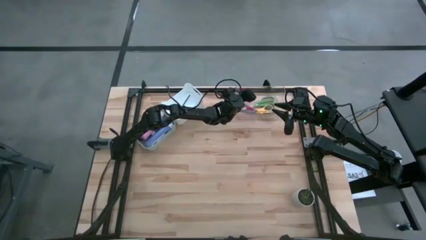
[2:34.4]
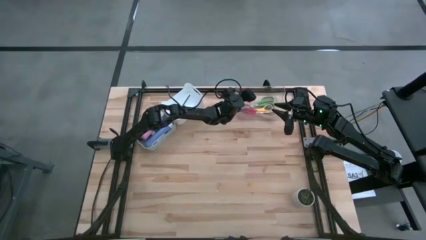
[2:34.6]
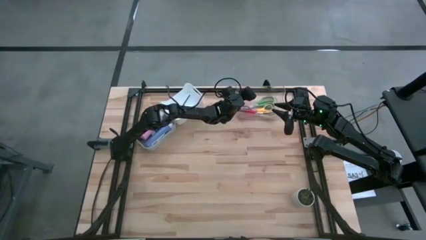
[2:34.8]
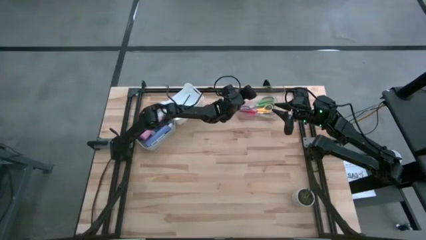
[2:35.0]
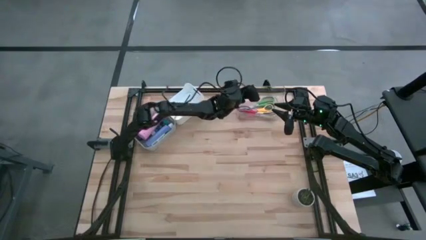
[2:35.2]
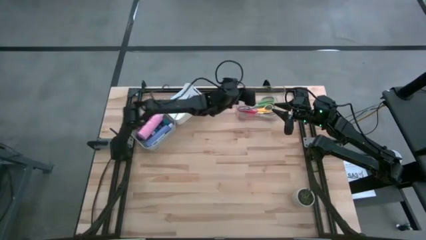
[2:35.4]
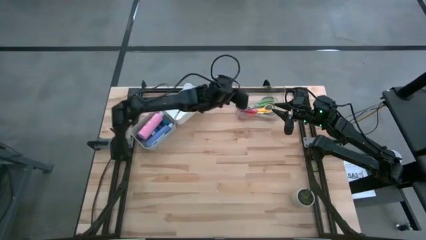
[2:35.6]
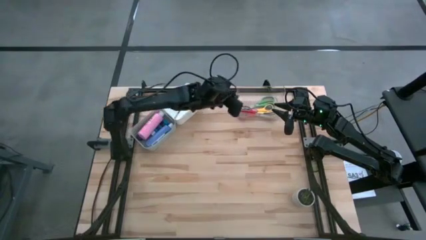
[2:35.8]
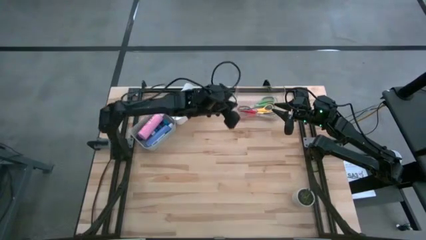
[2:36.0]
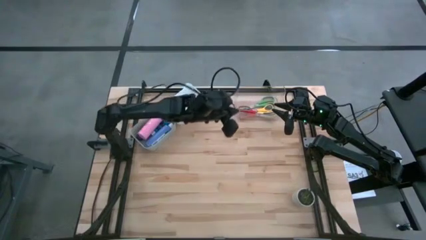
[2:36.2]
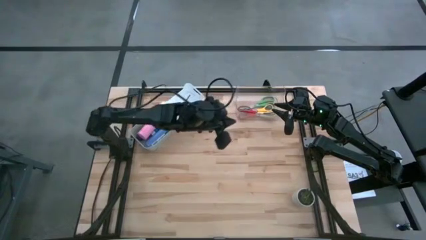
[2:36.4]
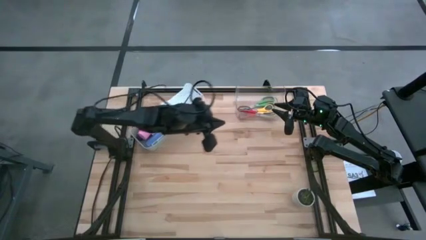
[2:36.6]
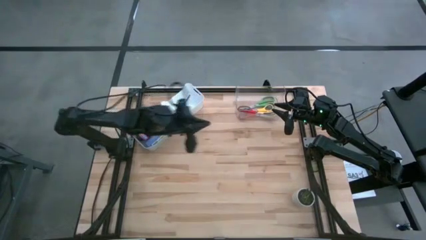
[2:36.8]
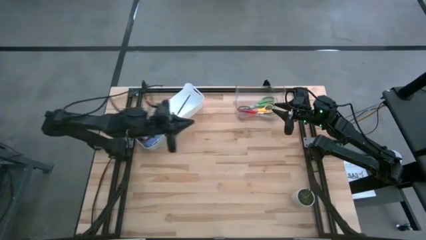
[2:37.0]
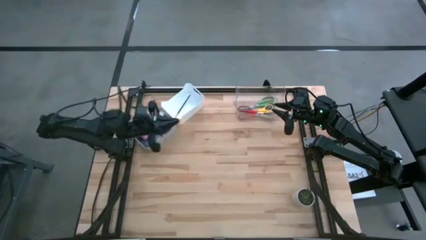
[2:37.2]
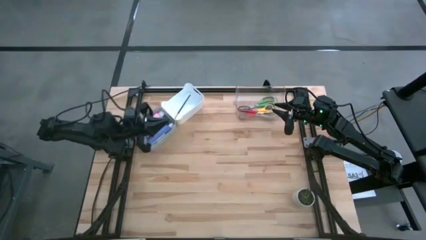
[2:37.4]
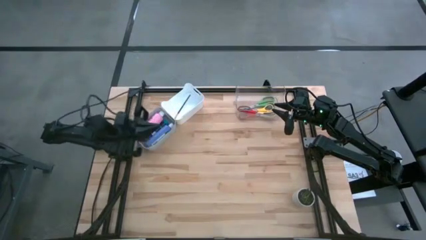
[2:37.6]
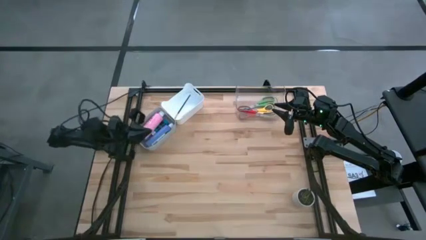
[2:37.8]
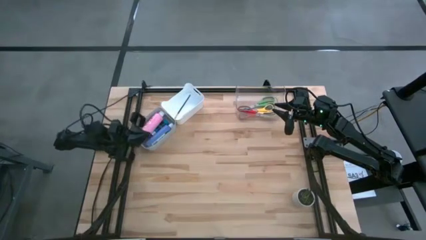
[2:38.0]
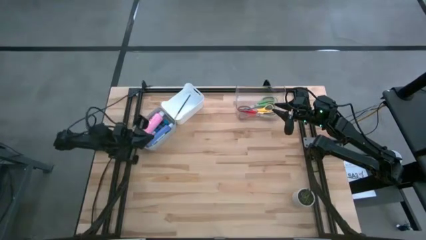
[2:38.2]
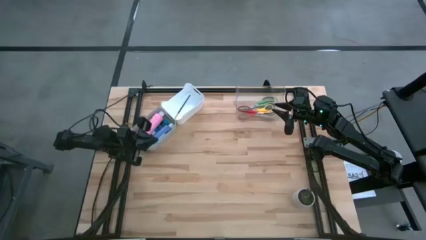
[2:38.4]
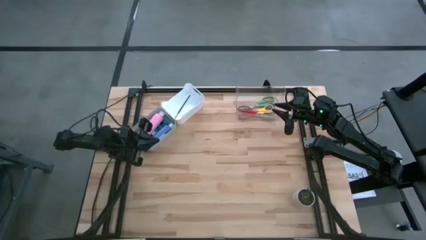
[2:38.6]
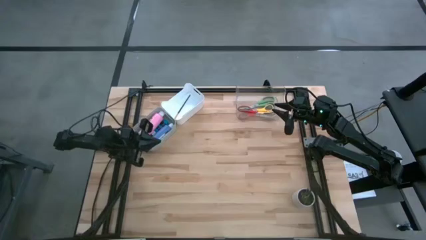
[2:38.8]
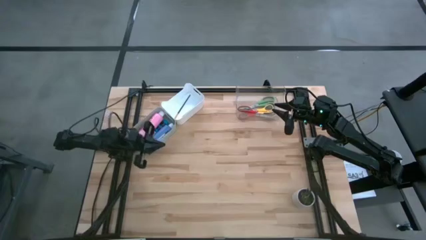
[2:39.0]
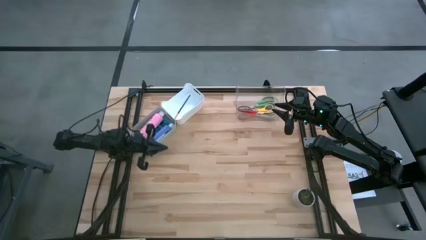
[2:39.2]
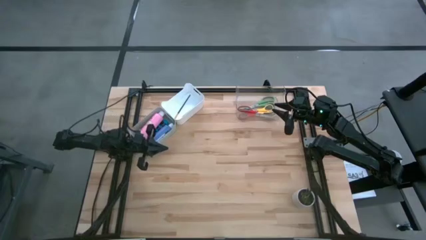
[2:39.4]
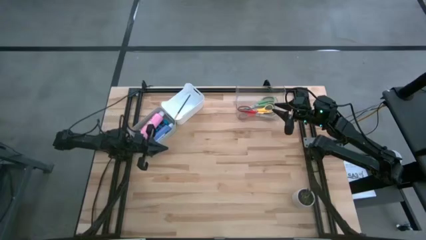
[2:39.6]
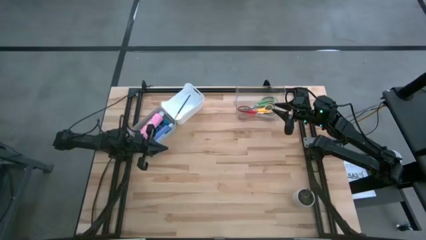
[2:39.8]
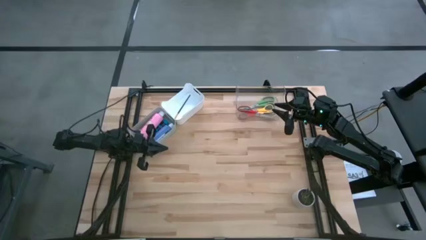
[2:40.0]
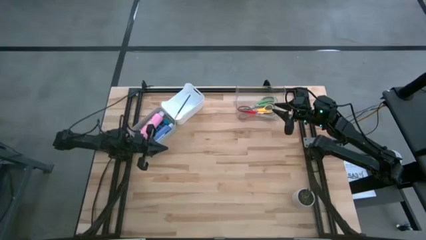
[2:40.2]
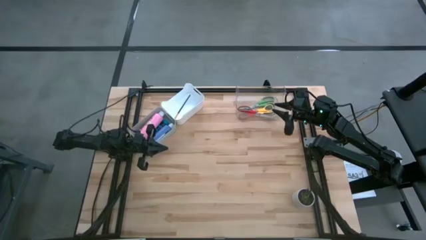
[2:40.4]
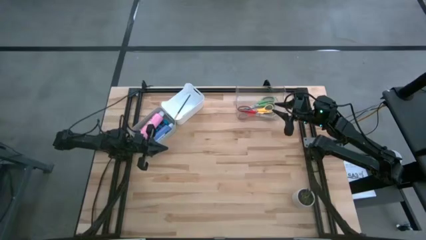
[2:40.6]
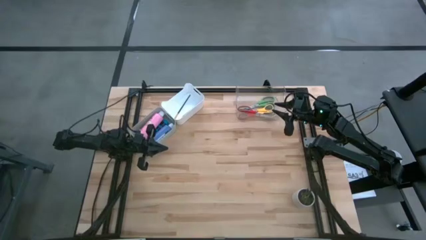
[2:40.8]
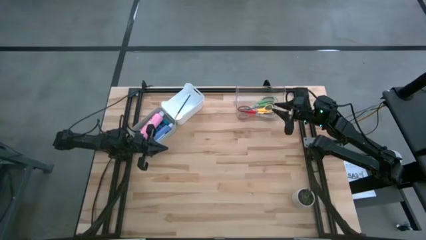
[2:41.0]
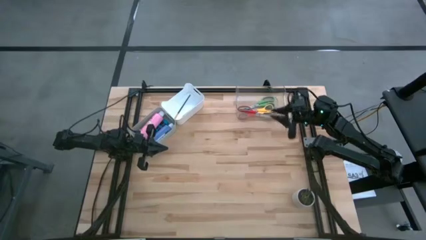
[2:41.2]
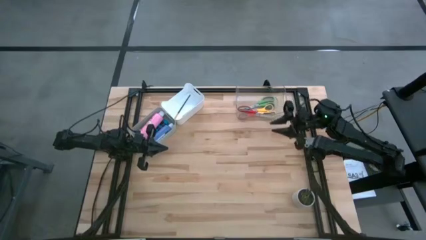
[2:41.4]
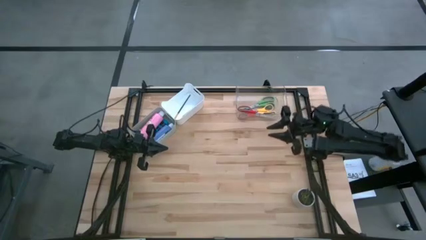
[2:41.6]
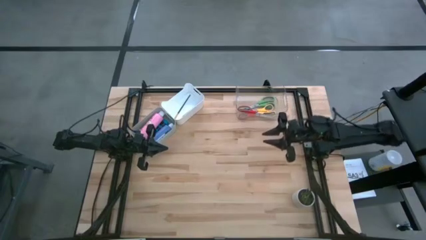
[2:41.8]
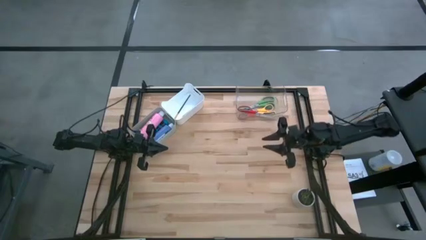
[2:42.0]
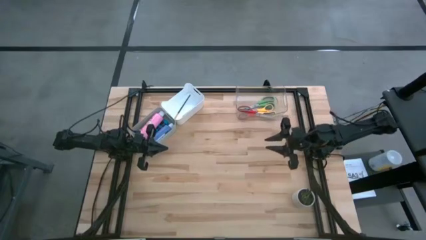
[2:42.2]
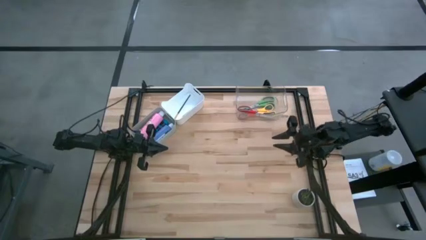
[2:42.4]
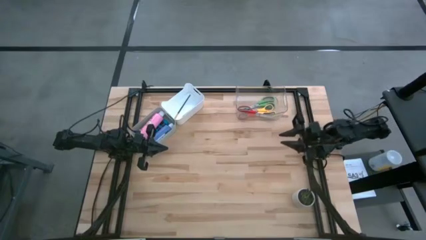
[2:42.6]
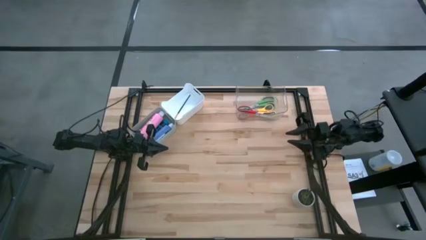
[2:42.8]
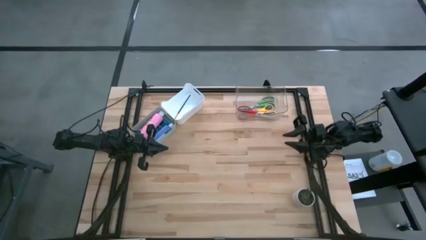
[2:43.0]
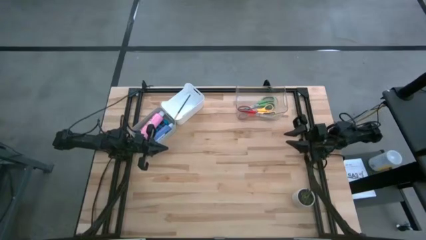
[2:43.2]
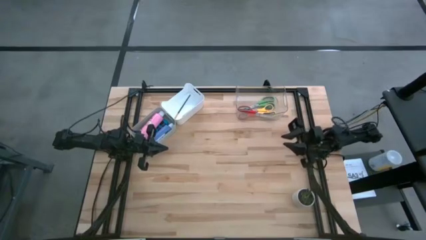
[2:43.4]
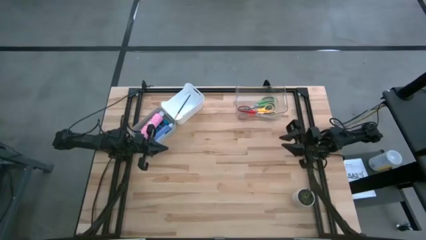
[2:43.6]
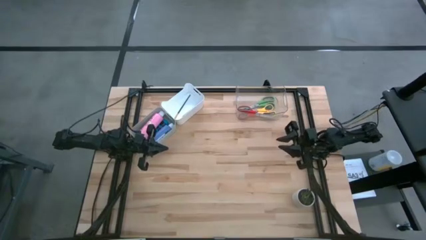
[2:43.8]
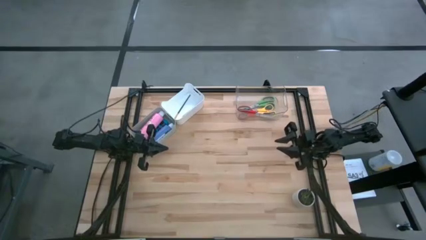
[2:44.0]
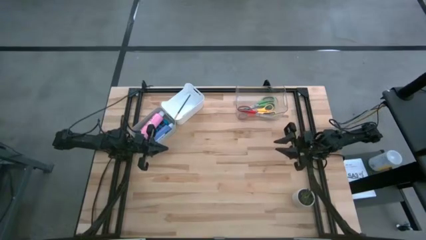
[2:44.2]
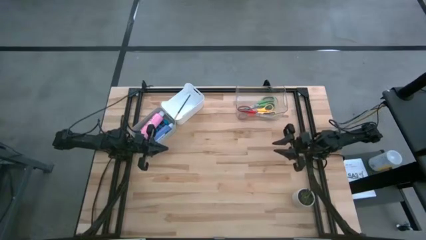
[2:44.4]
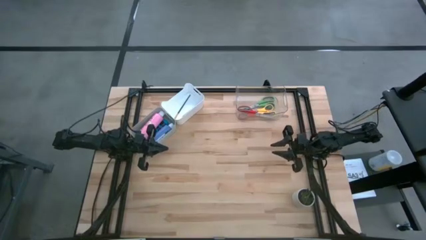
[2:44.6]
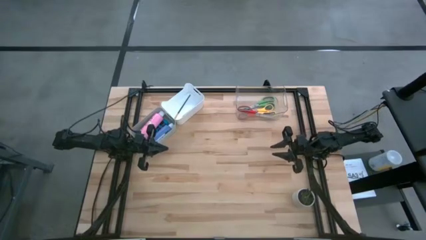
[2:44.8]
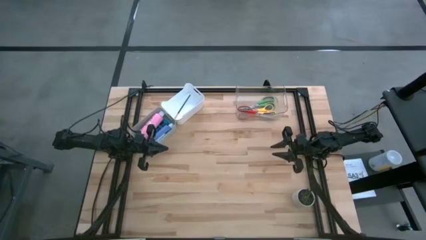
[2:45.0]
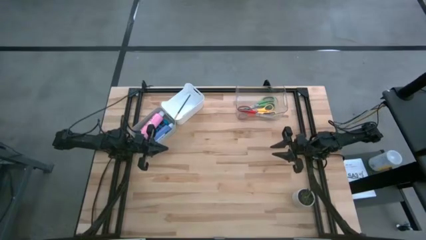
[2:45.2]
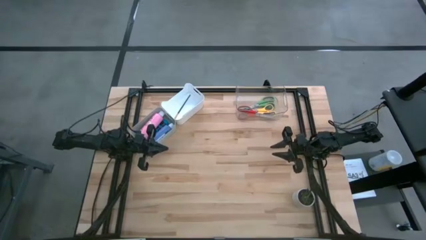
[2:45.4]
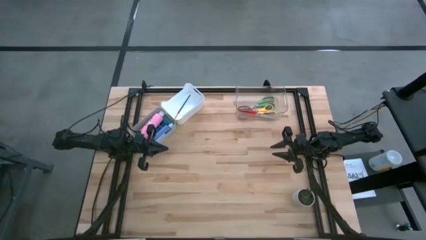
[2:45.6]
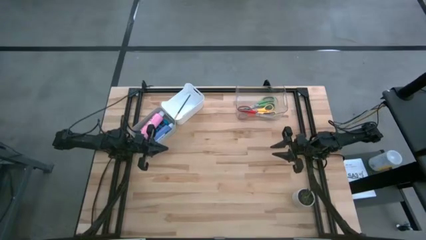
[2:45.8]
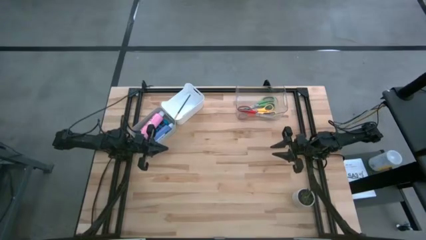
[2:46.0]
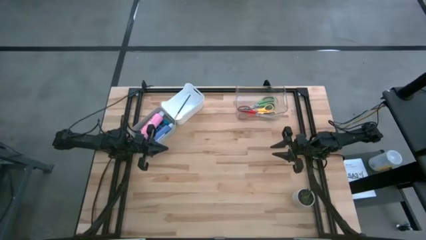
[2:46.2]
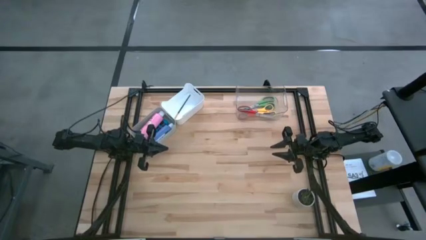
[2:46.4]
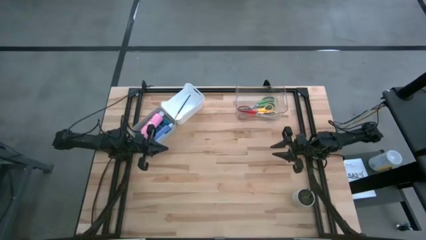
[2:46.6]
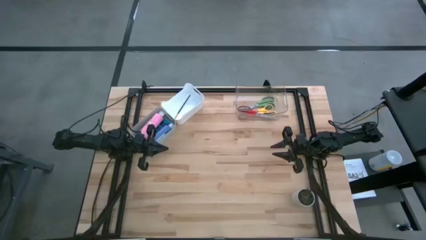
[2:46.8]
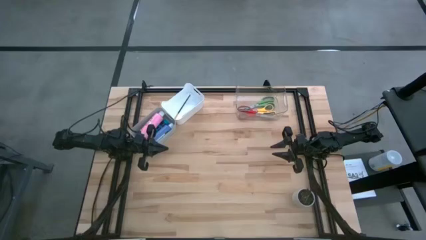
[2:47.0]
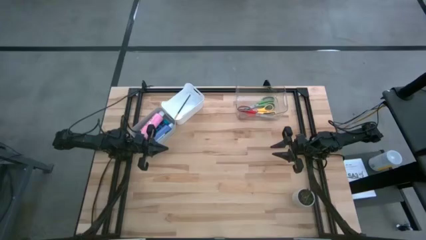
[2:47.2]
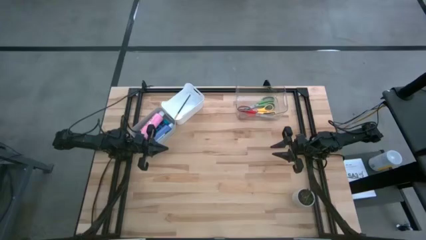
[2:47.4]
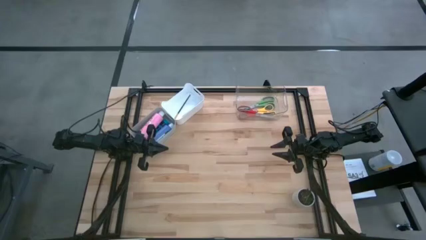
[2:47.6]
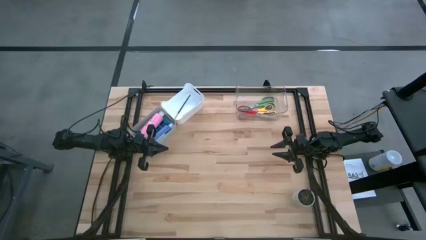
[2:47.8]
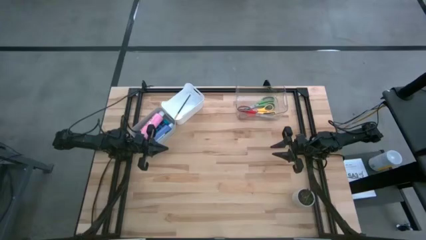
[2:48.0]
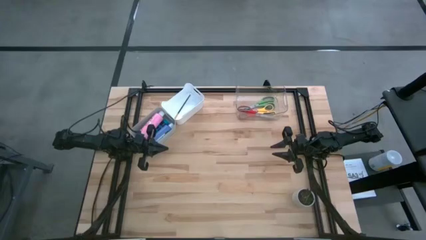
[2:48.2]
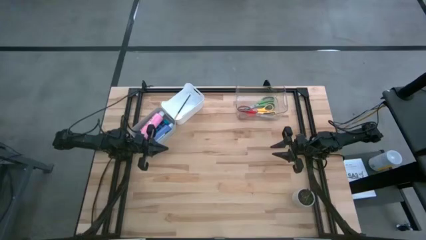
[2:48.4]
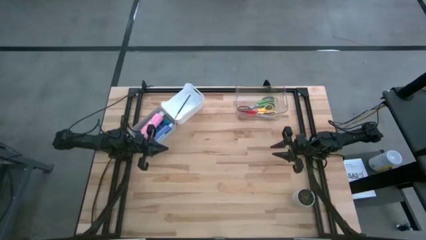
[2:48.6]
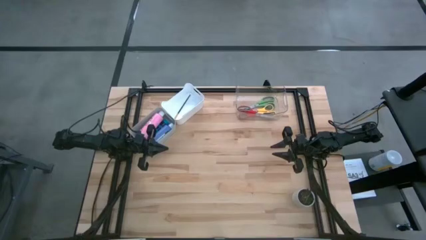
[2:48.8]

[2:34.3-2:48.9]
Task: Pick & Place Paint Supplies
Return to Home Position
